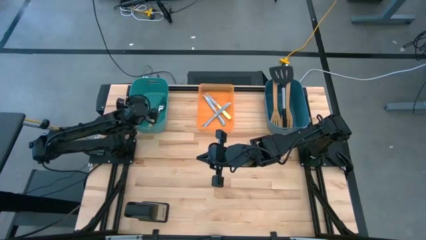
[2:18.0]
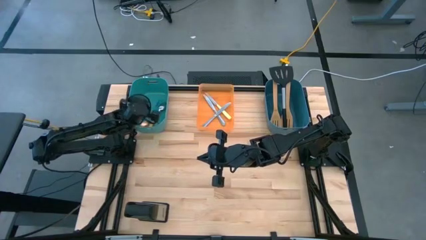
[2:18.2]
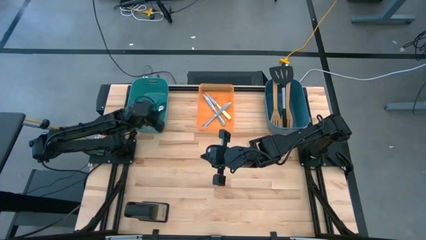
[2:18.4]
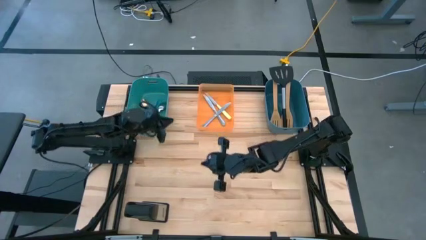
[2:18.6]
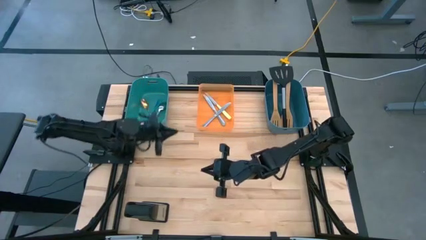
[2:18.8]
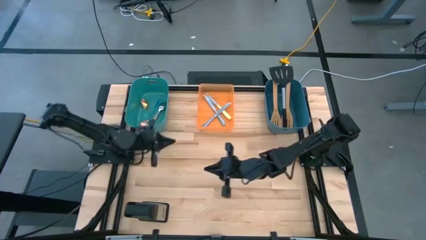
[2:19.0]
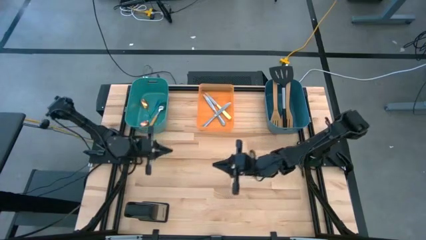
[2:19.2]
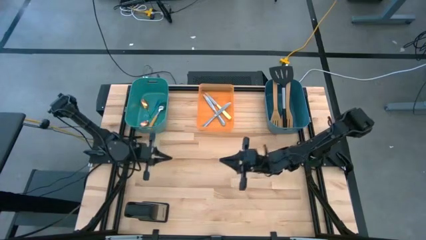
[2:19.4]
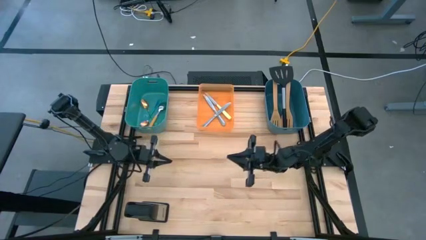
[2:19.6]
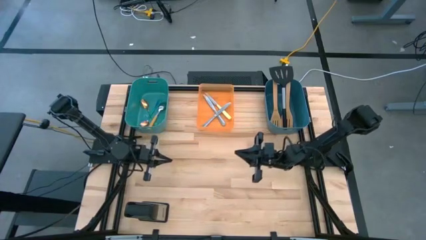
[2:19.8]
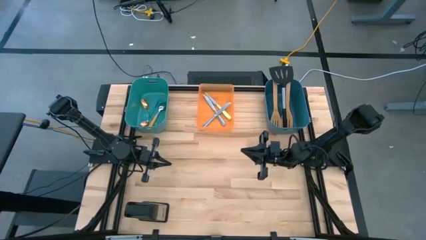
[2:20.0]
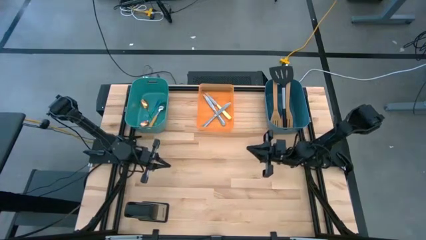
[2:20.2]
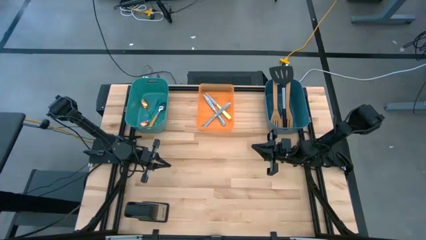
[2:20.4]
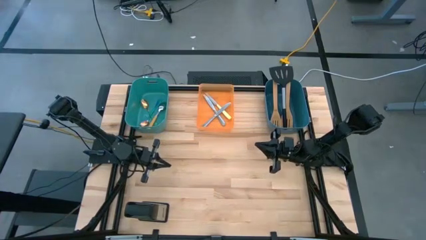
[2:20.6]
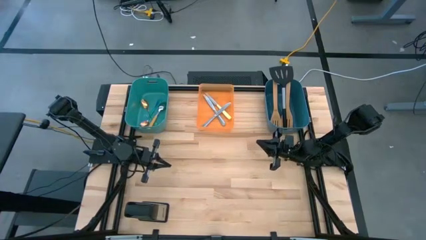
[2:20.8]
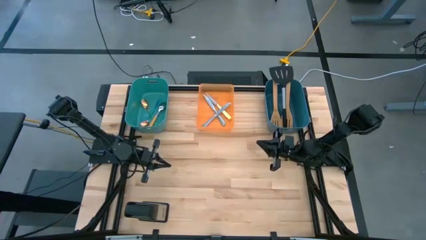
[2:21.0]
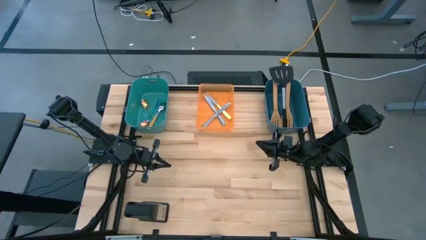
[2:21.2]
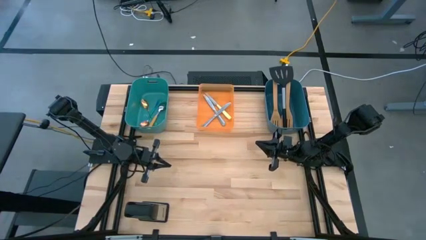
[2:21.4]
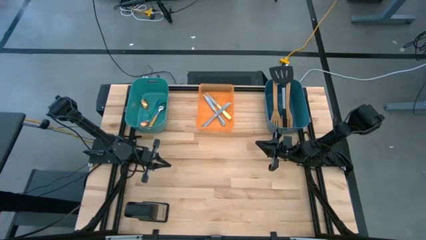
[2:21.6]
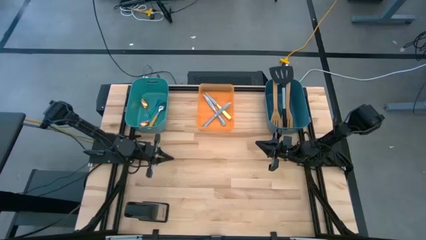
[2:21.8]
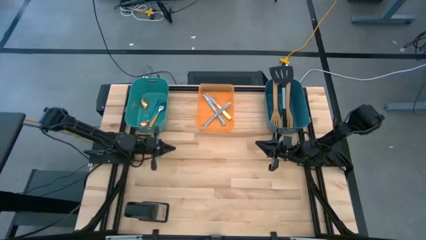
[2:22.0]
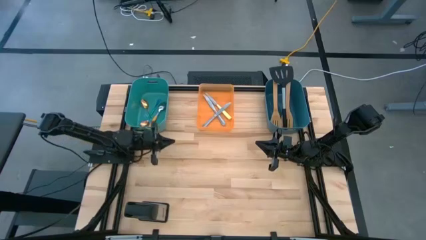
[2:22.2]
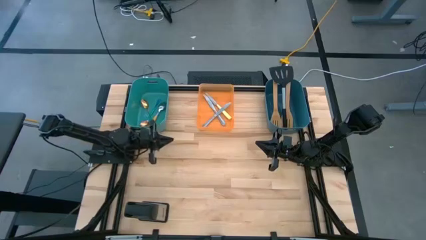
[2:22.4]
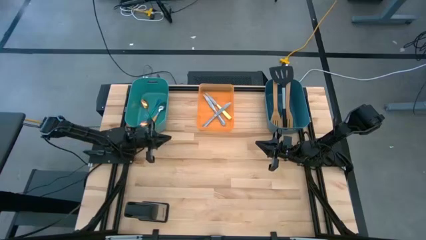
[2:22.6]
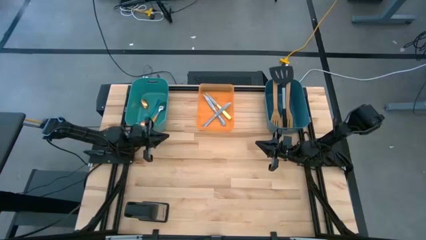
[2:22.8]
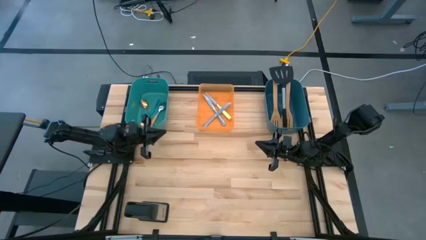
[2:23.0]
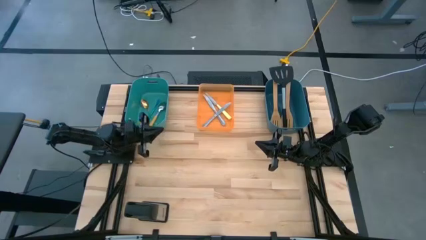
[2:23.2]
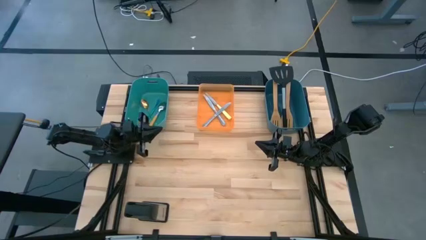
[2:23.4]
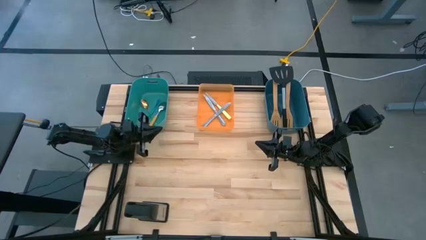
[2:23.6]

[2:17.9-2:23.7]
Task: Pick & Place Kitchen Items
Return to home position

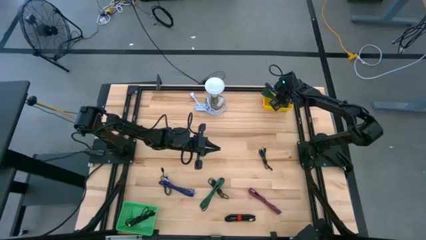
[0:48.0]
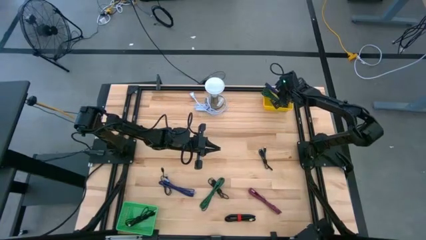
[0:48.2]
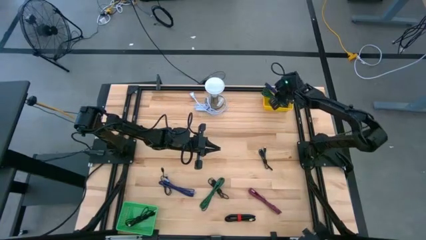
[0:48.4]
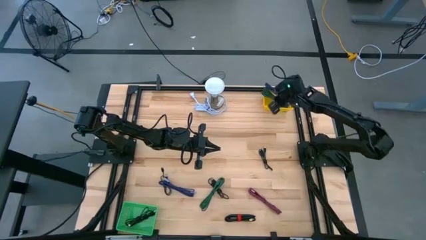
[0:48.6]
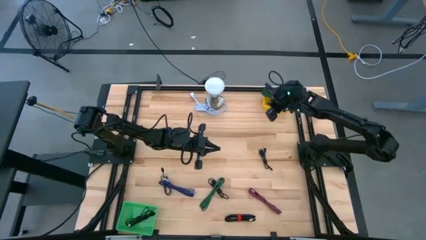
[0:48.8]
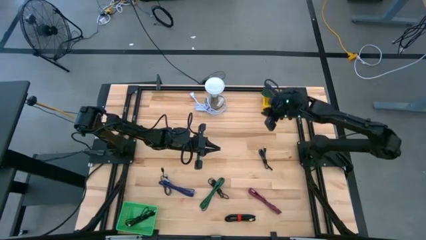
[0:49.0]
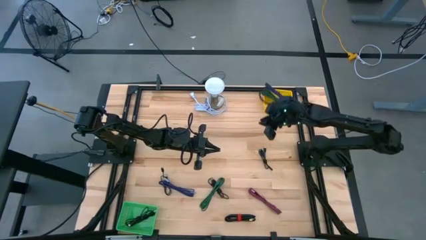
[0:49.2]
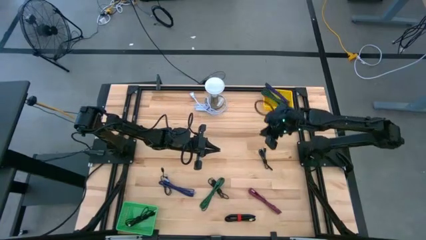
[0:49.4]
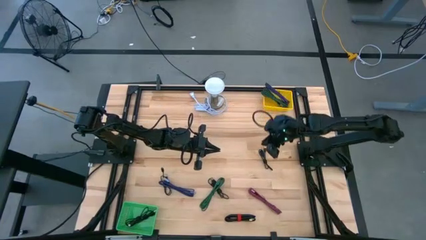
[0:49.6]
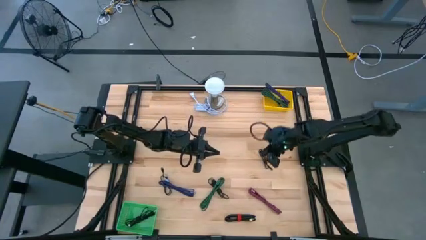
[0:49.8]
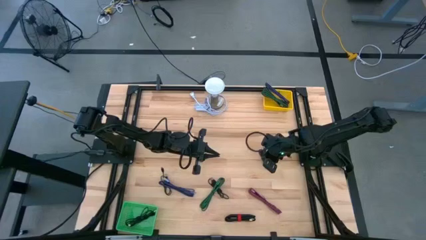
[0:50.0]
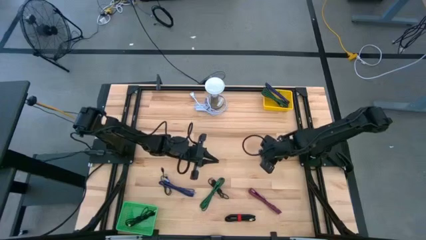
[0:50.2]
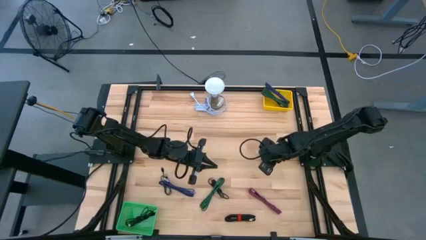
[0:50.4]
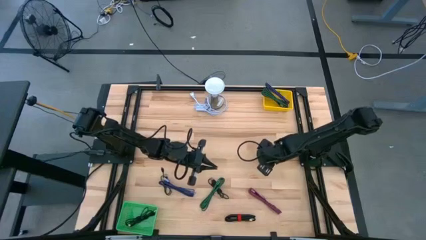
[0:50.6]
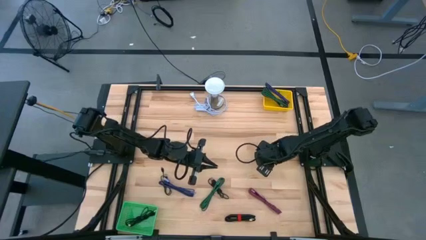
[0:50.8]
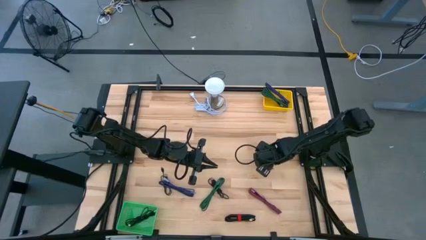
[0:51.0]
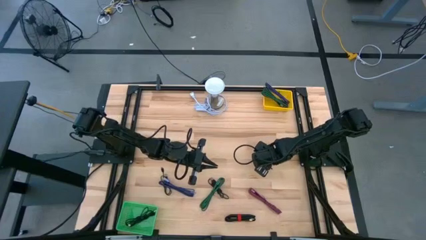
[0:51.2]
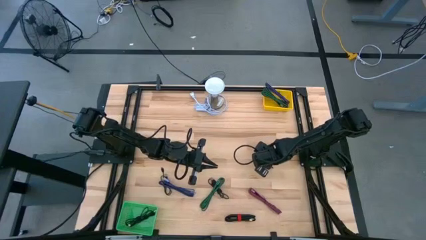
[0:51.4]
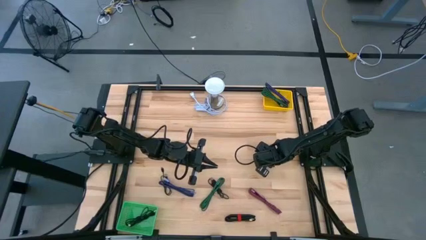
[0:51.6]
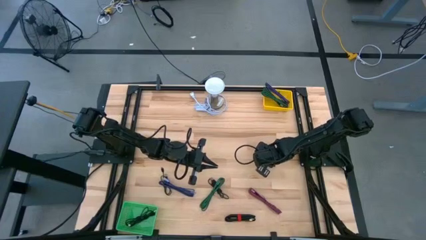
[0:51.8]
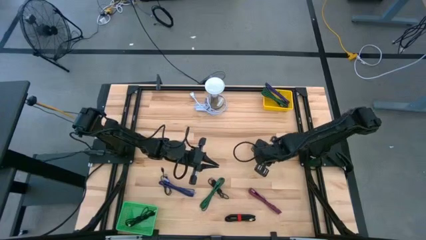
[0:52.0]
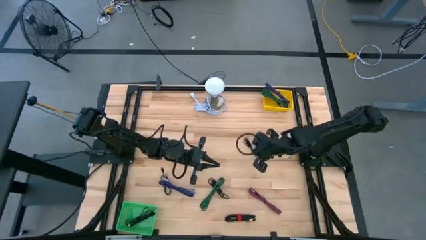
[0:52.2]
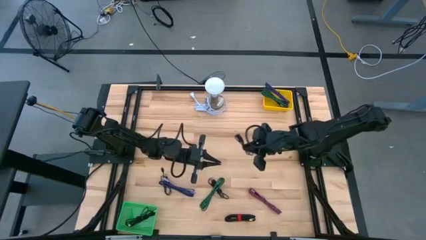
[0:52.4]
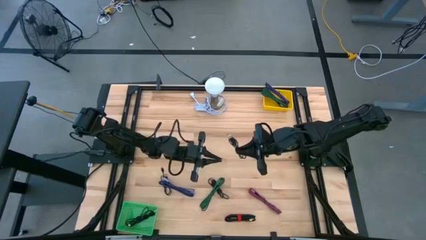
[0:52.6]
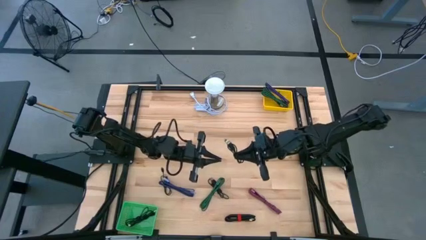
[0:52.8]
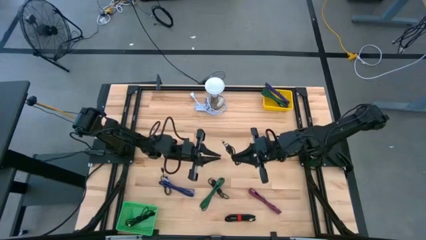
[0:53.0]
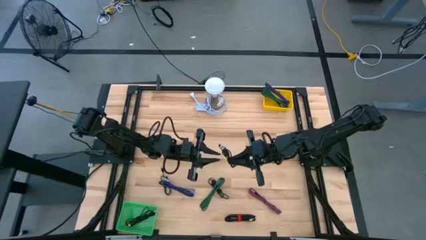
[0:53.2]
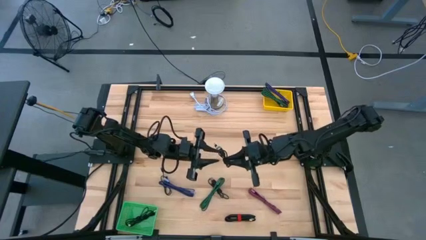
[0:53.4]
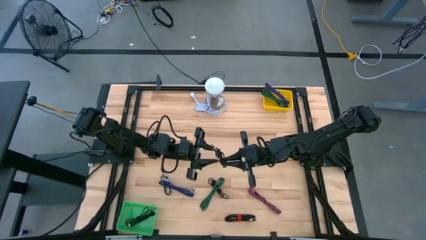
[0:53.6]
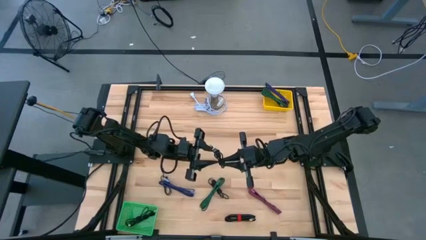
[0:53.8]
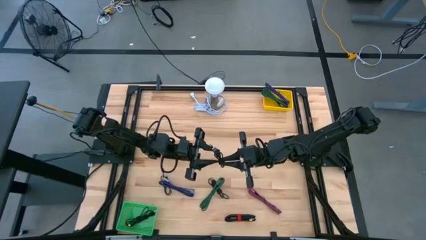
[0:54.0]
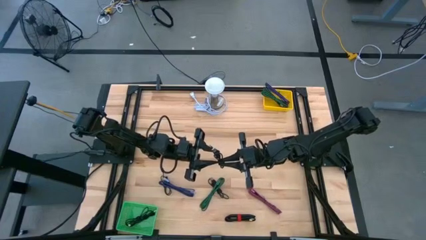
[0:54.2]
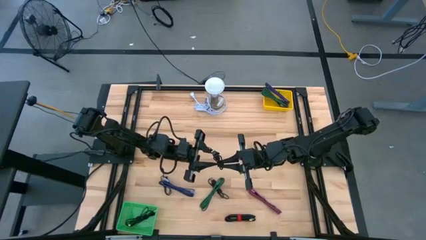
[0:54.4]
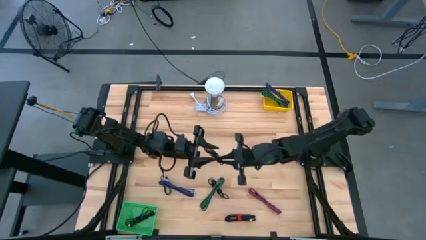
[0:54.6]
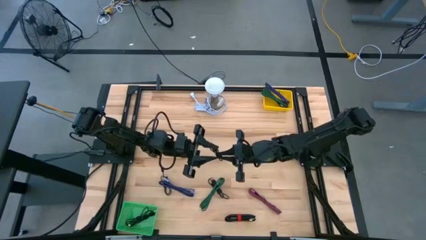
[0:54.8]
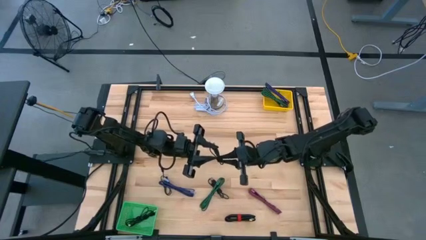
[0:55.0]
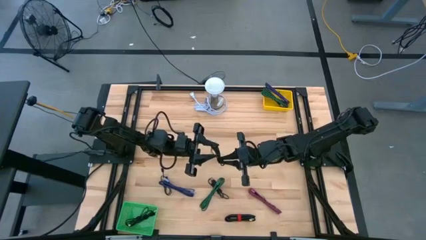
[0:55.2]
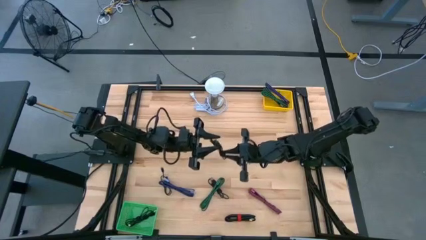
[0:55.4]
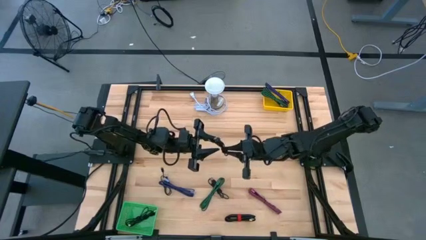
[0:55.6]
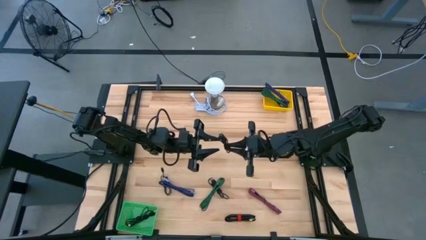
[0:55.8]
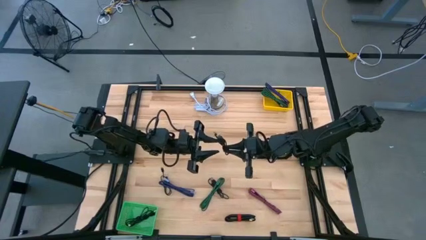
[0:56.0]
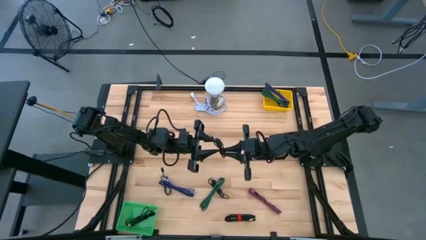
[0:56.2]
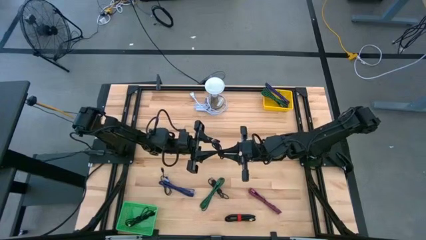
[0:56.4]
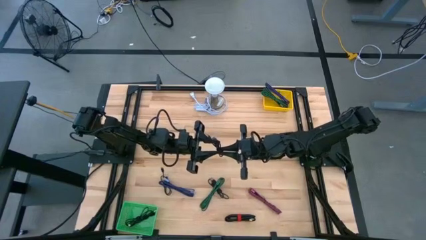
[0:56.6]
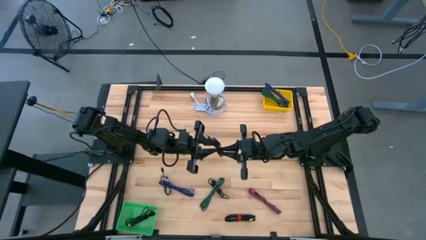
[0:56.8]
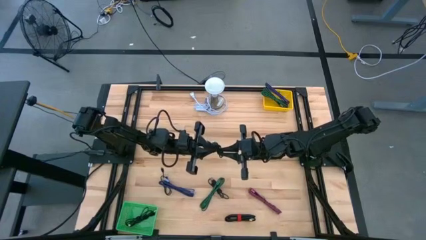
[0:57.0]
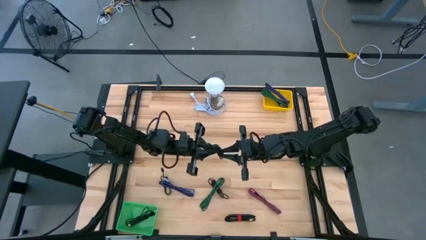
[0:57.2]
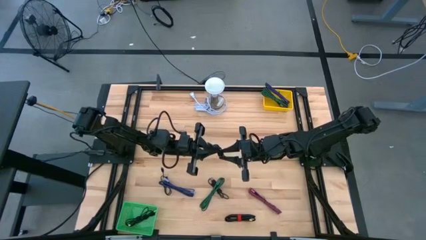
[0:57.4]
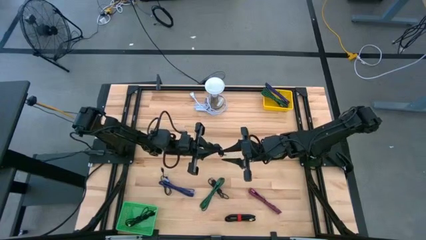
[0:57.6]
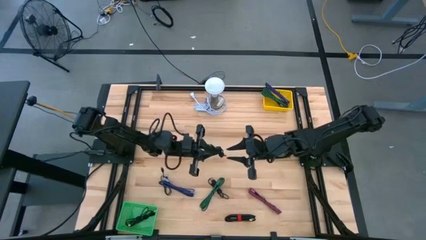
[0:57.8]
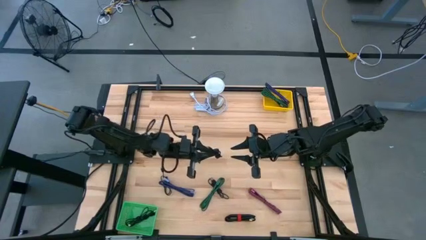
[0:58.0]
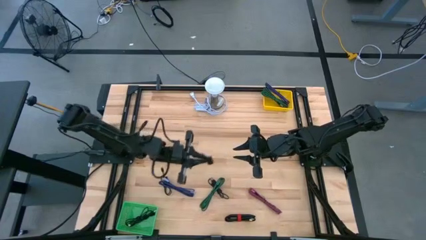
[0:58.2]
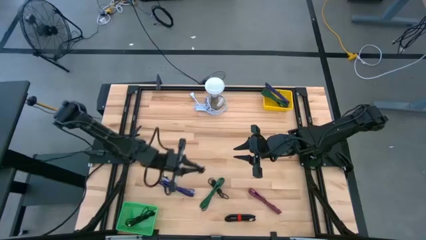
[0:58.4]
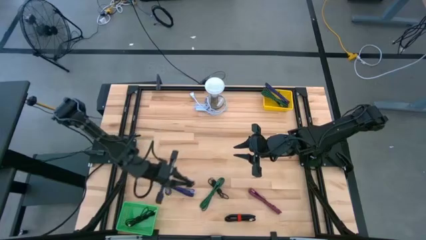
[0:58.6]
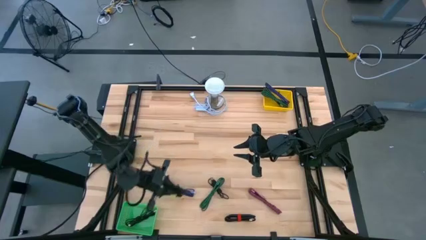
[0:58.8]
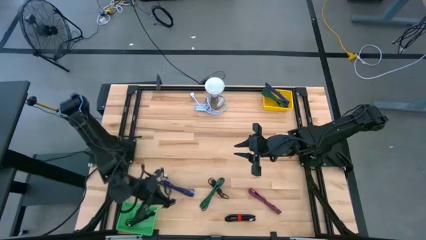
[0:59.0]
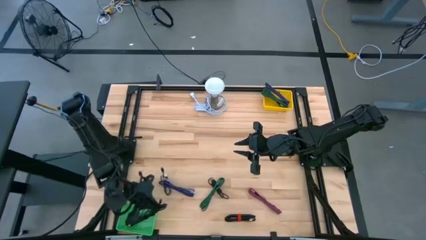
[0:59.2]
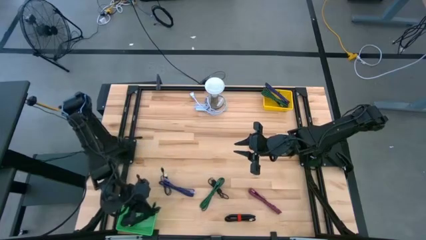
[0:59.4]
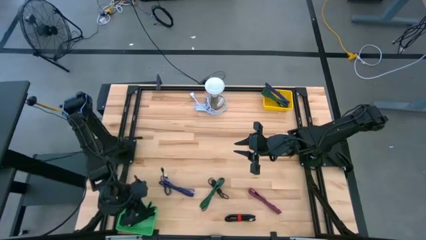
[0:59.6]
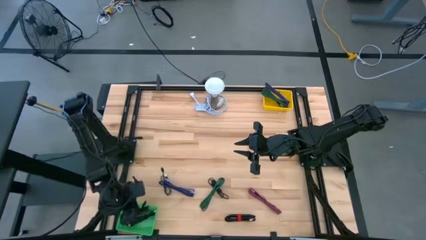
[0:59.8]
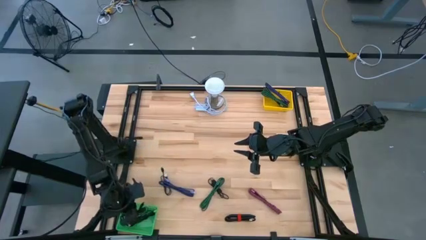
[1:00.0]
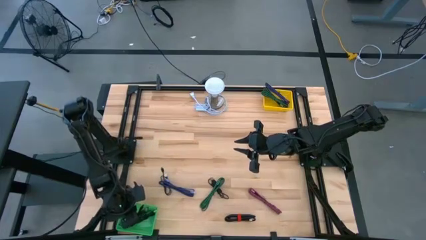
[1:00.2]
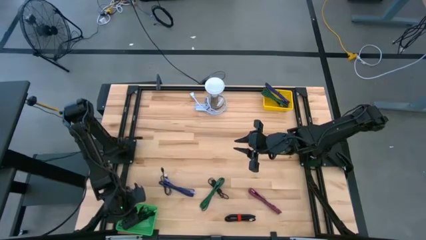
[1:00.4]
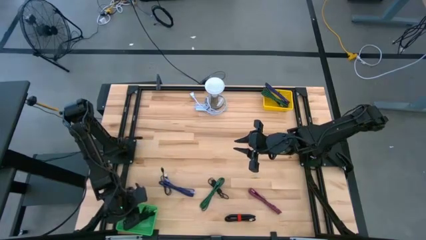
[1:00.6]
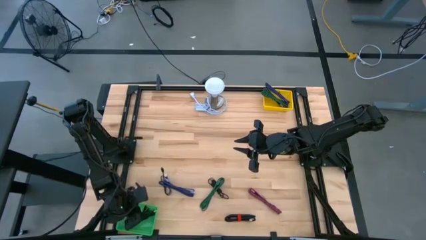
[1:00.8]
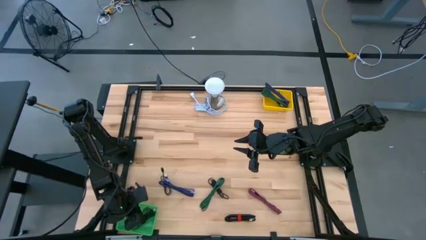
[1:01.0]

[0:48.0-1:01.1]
Task: Pick & Place USB Port
Put the black USB cable into the green bin
